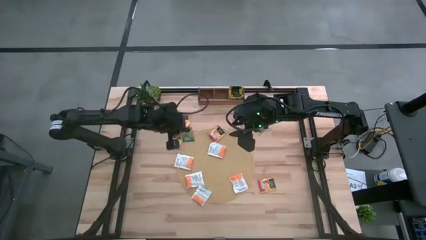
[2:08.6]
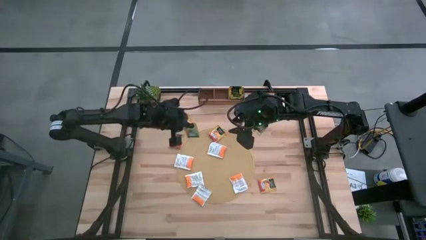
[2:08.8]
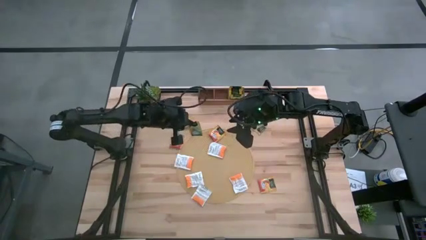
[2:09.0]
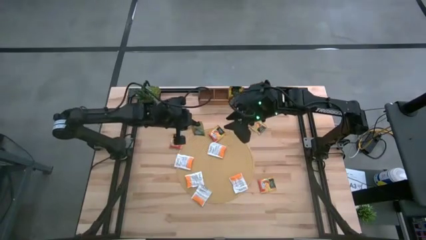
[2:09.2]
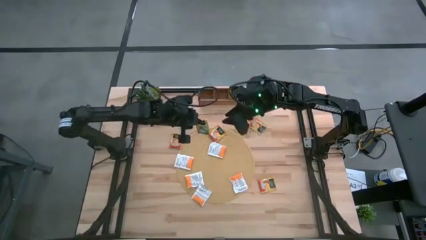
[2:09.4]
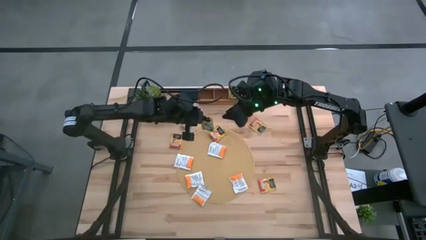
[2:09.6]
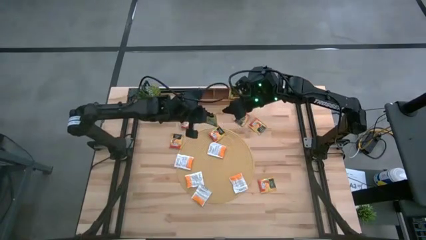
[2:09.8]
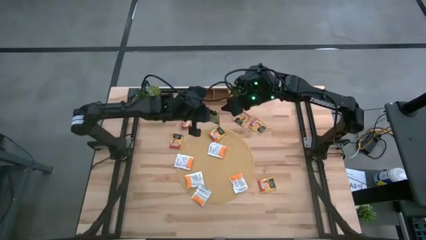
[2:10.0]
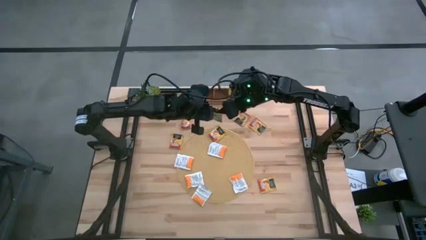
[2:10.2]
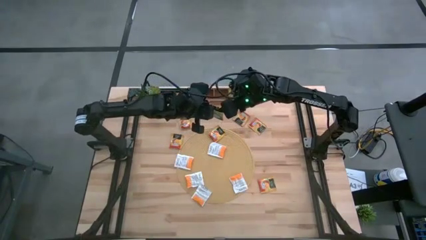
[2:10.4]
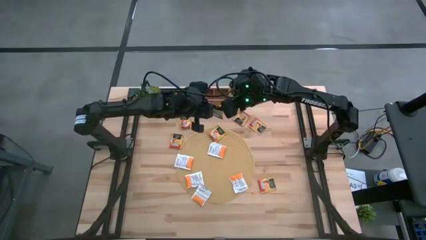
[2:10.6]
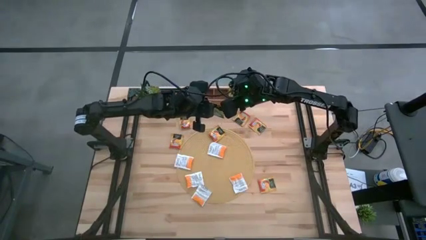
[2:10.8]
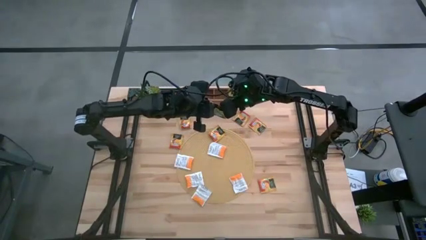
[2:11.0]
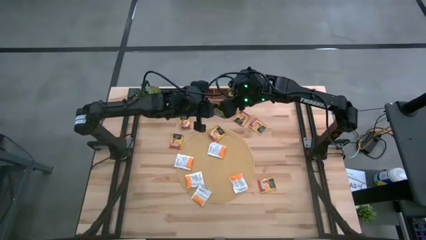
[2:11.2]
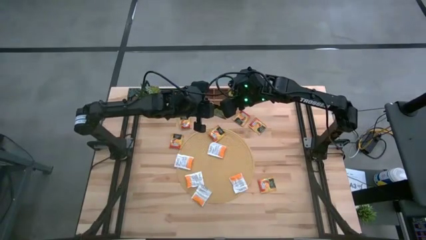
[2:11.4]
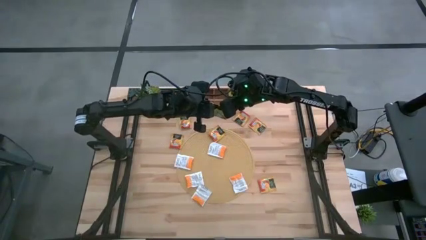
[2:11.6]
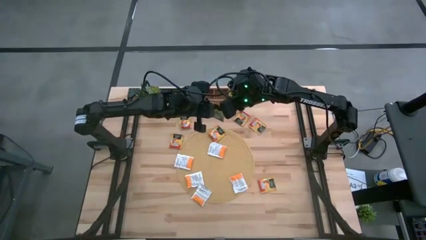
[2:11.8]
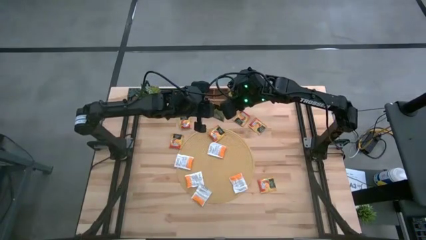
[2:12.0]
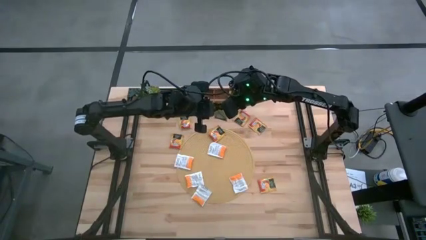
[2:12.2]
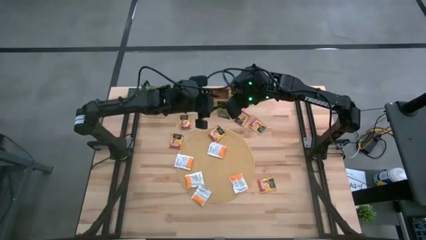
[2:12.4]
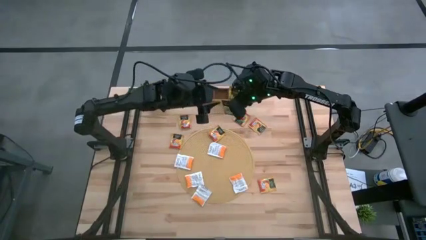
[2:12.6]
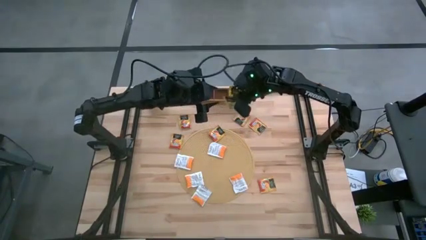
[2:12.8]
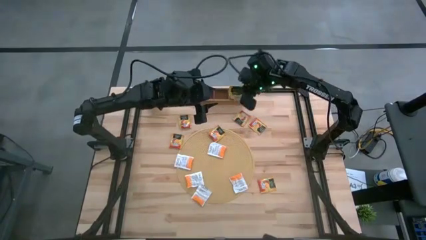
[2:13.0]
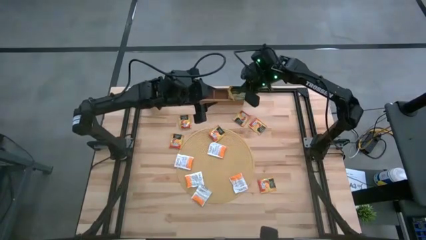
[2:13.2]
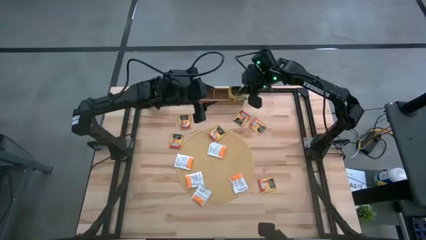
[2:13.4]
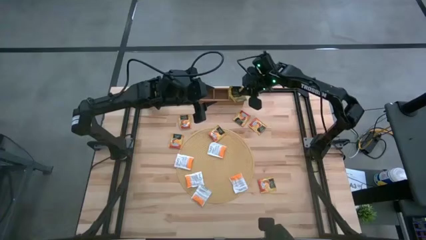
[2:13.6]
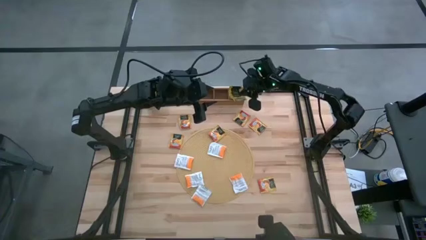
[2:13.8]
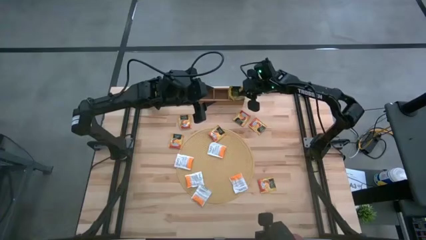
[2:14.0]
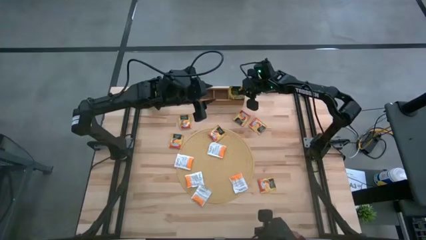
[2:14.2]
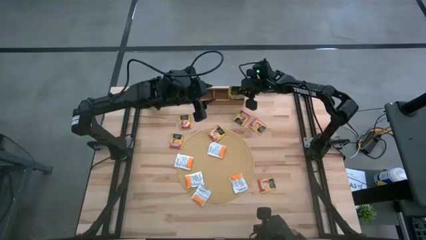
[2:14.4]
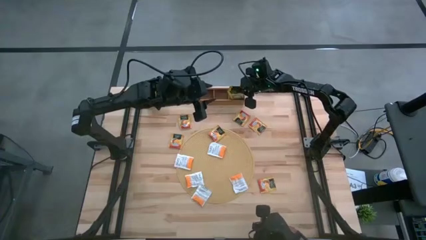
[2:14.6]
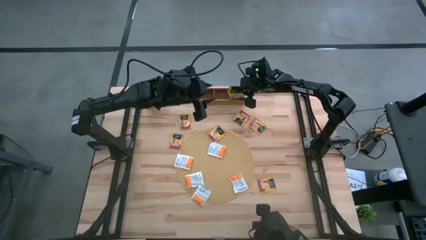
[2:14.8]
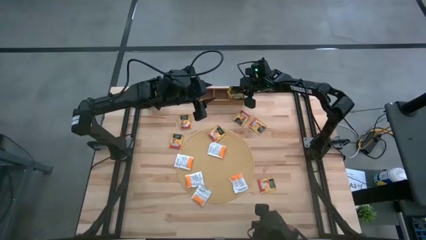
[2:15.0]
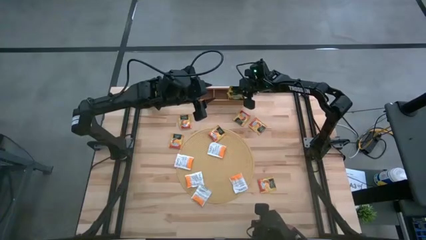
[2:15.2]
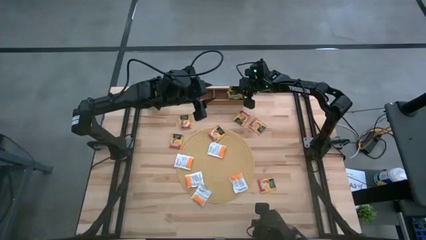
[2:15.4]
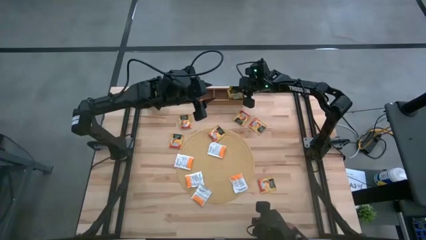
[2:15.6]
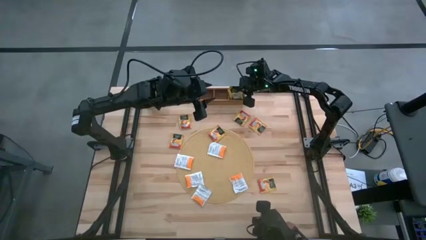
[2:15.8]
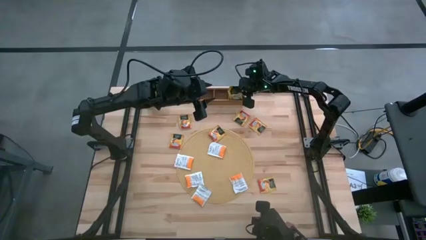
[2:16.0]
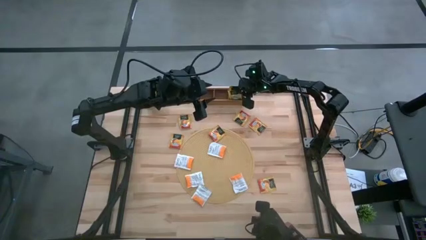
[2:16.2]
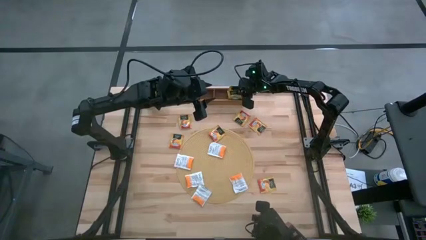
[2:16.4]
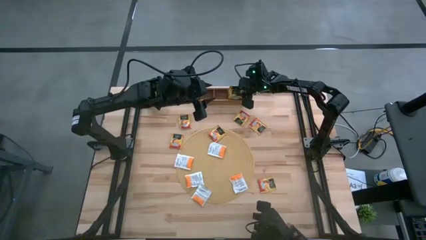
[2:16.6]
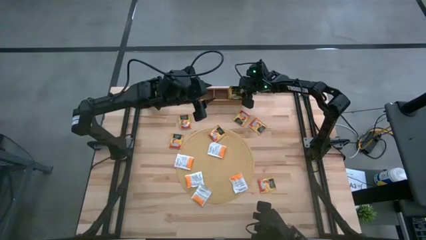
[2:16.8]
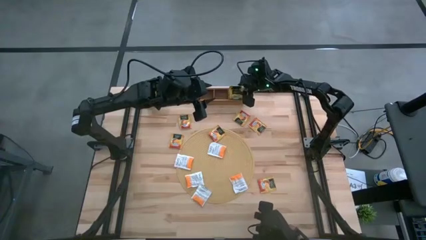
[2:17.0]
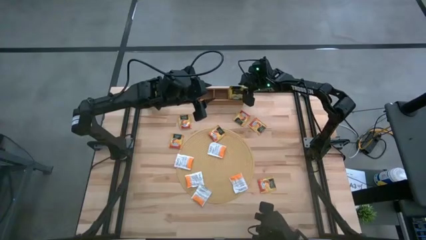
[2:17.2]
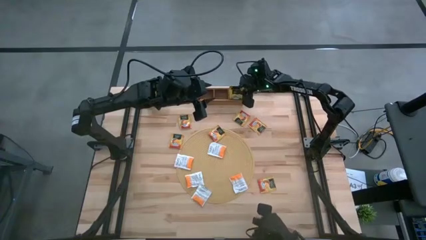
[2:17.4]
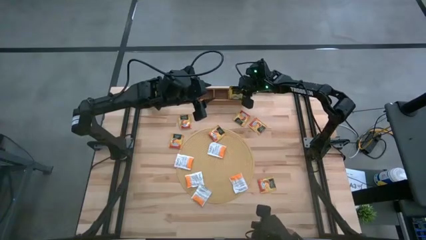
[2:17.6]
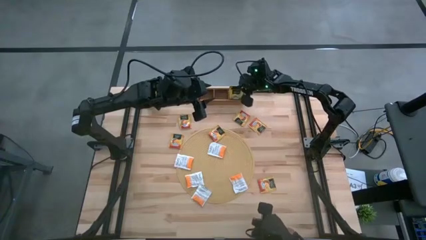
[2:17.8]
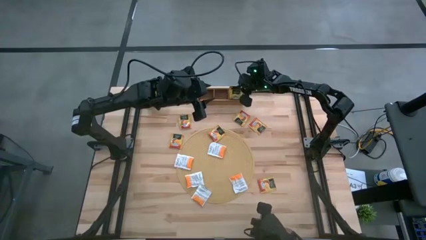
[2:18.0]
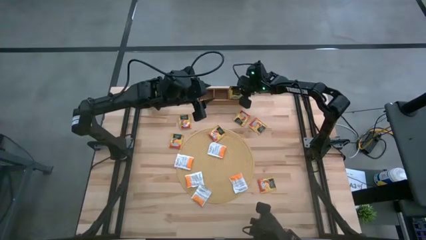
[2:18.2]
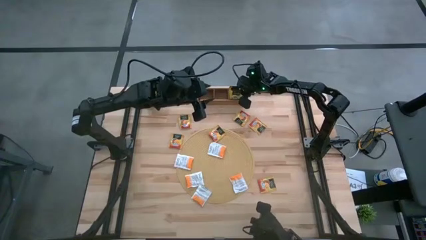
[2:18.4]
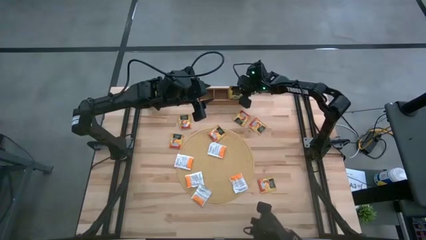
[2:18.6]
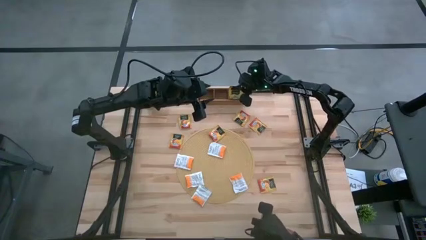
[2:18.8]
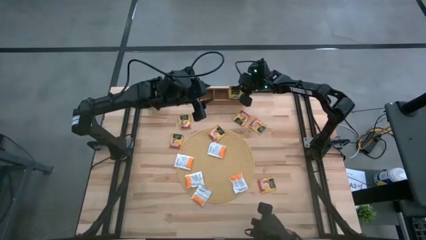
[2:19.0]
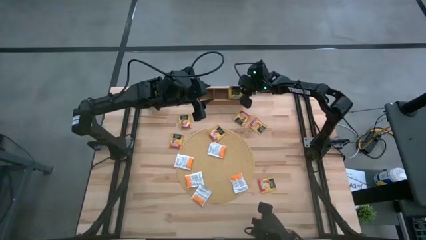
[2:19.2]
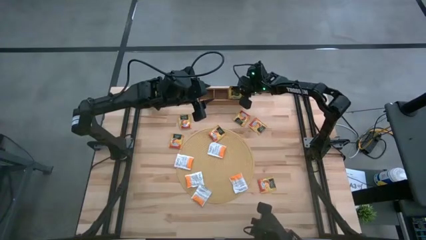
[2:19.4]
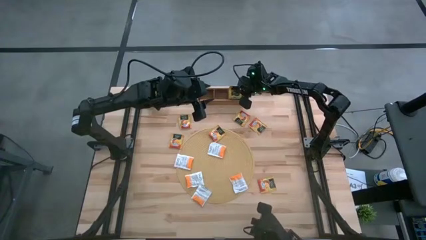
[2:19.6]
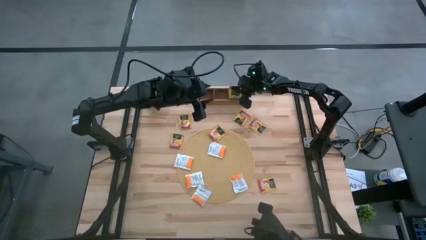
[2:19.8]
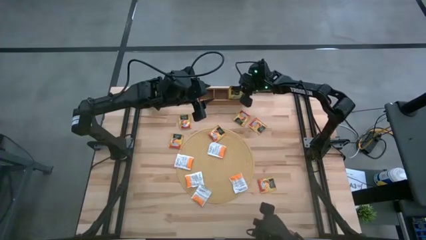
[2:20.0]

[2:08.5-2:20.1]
Task: Pick & Place Tea
Put the yellow tea bag into the right section of the wooden organizer

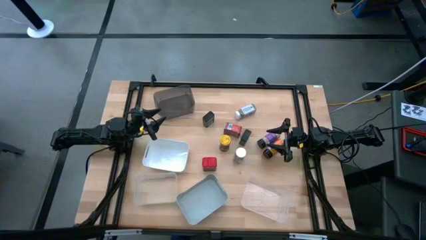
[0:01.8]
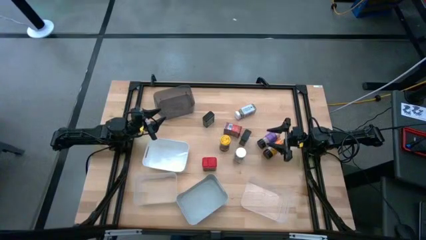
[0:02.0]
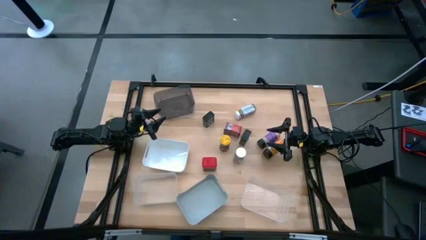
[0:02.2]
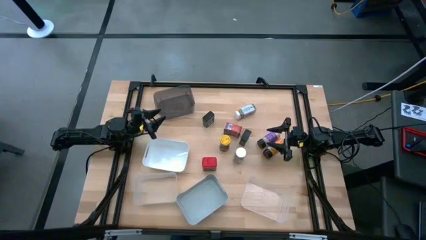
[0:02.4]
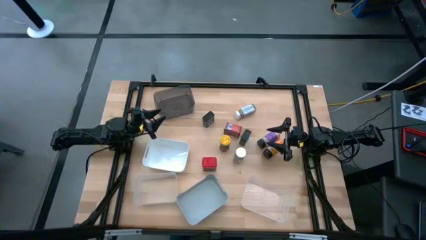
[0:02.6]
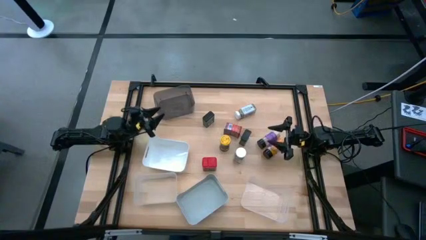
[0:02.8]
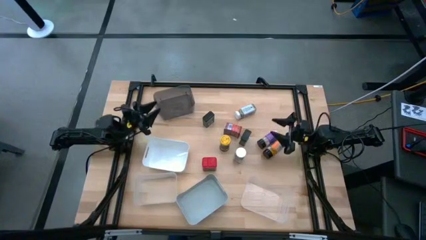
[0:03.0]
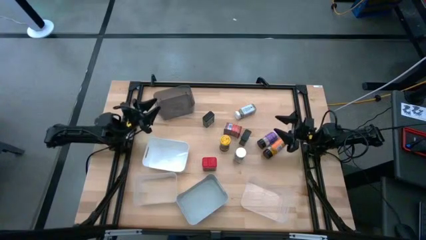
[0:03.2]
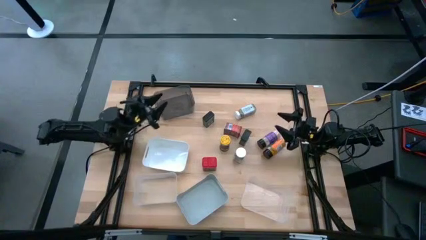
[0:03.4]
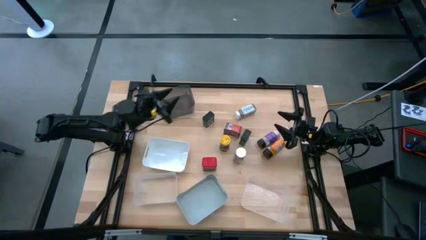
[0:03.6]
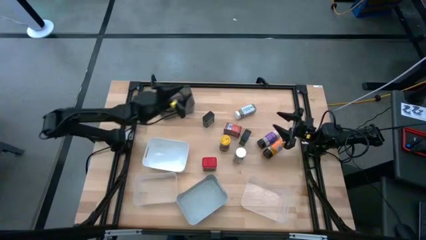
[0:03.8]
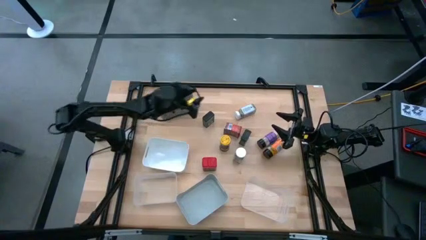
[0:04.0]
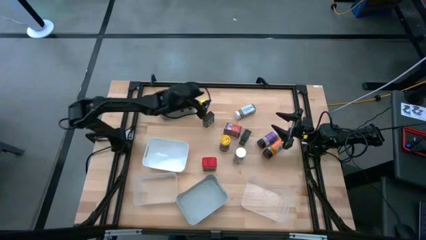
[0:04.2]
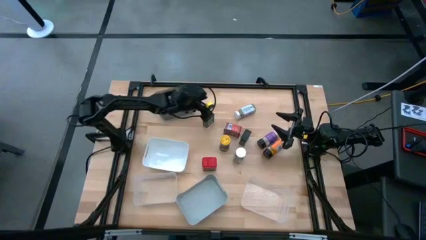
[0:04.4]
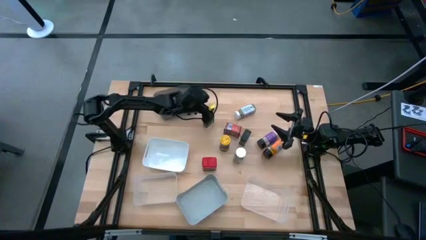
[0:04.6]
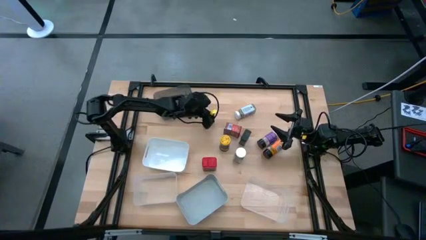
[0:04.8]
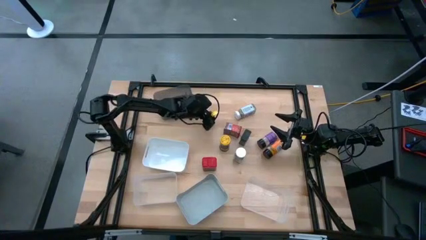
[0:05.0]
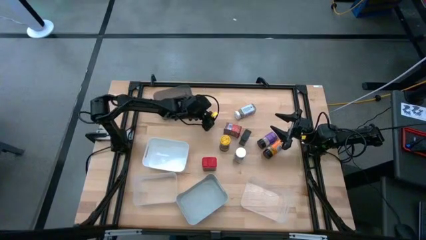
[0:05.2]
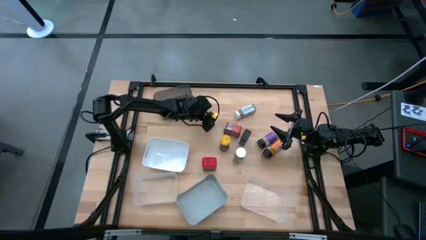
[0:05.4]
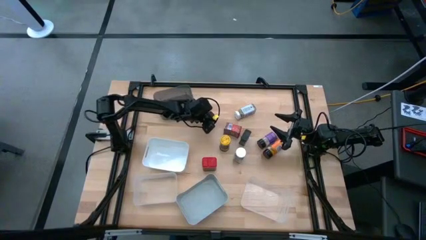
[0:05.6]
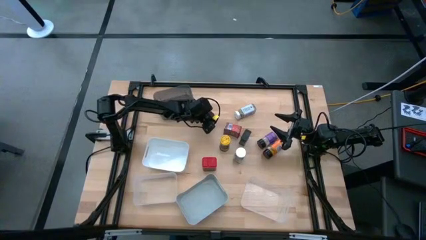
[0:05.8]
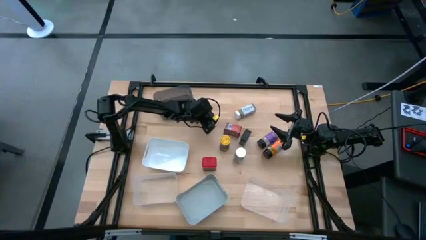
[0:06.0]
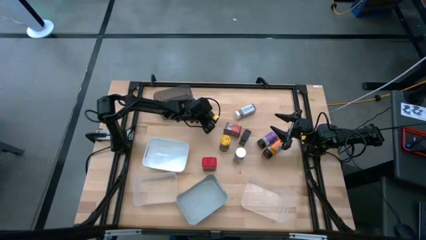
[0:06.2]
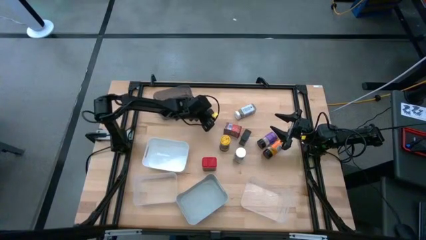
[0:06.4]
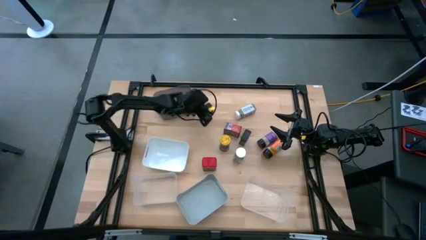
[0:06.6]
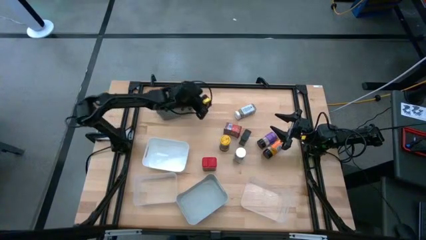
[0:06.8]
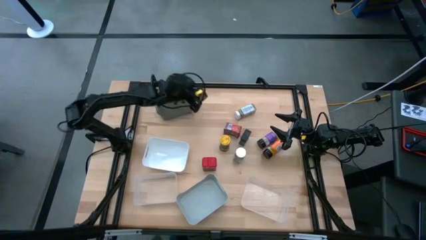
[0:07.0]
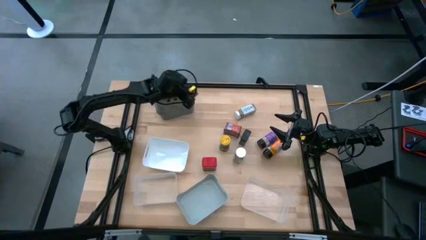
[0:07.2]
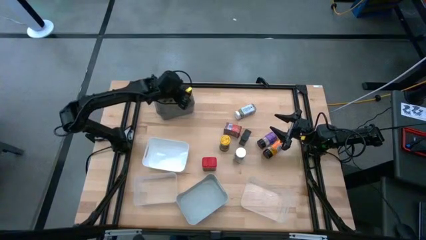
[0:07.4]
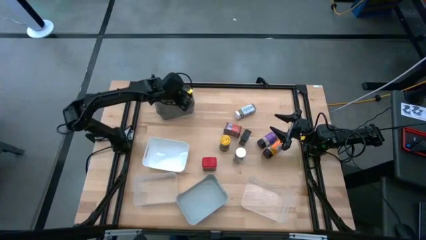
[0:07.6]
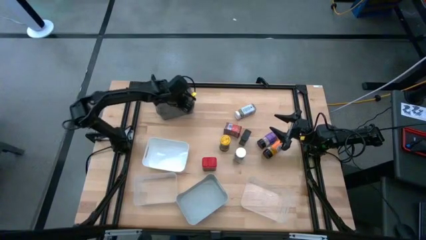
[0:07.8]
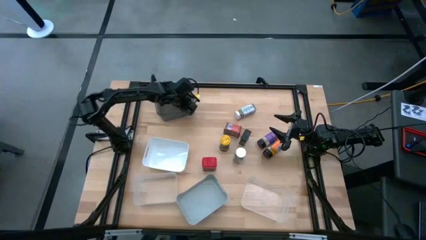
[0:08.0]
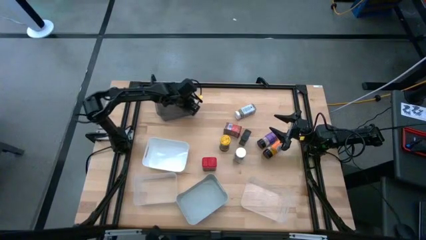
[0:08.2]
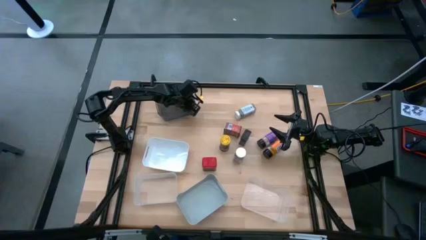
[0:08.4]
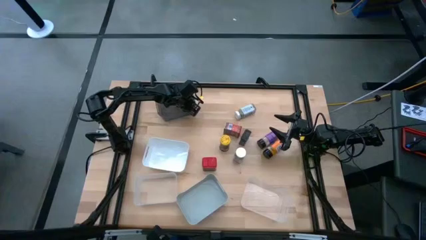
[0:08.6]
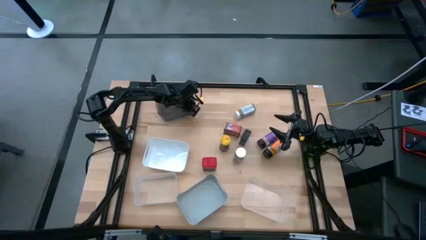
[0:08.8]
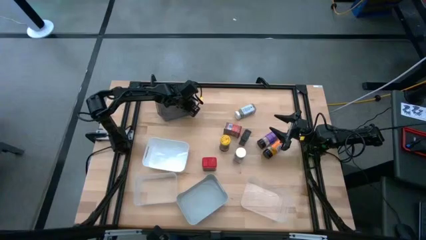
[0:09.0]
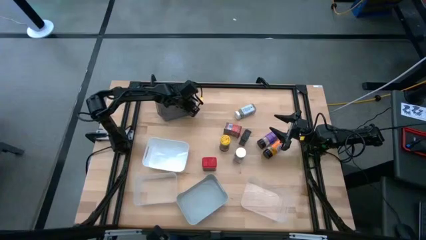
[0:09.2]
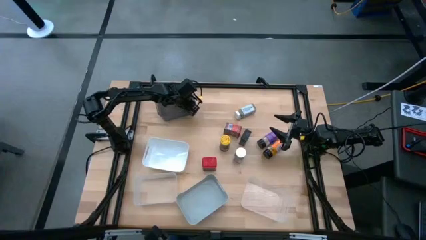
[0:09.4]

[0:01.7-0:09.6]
Task: Sort spices by type
Put the top black seasoning can into the black transparent bin
